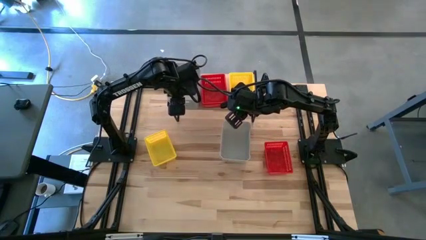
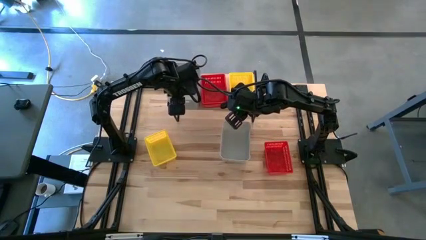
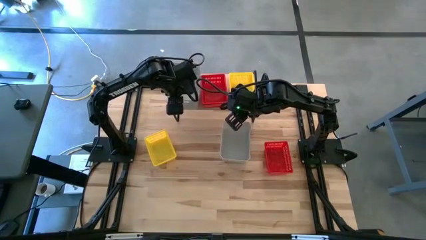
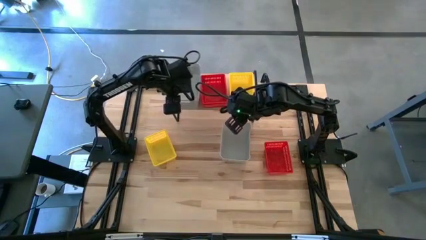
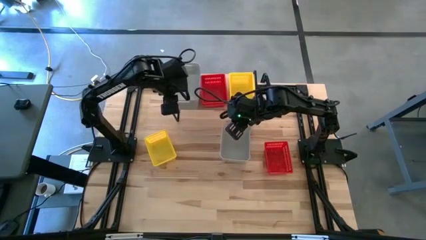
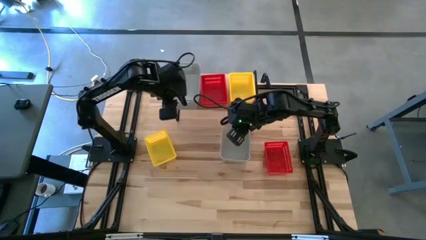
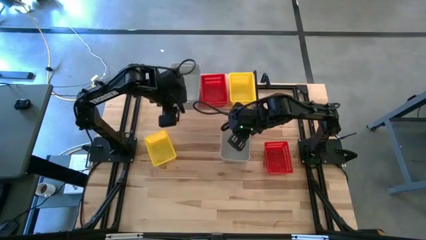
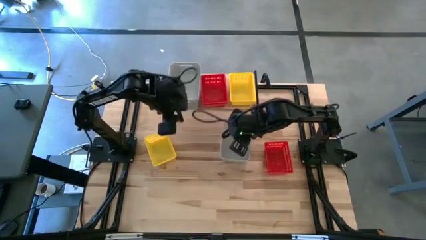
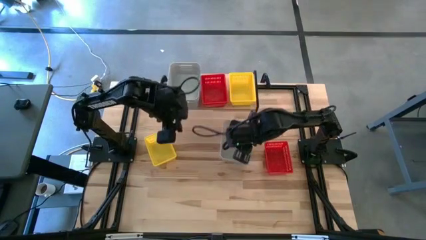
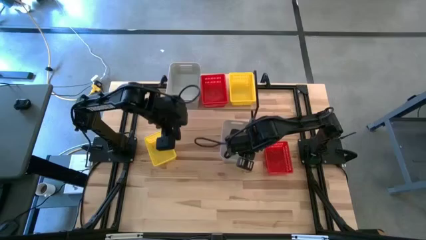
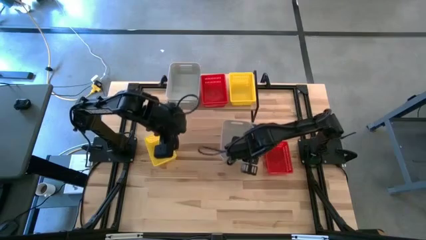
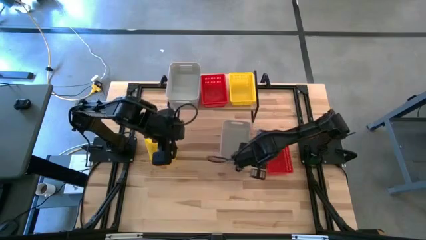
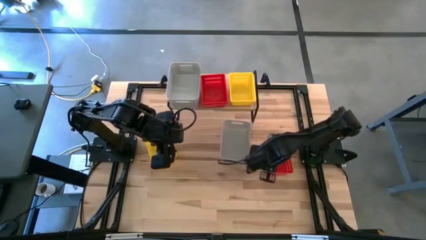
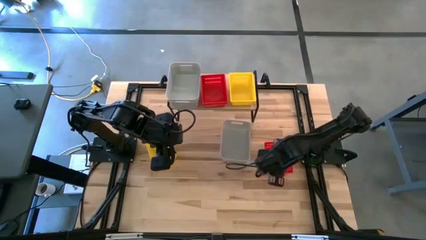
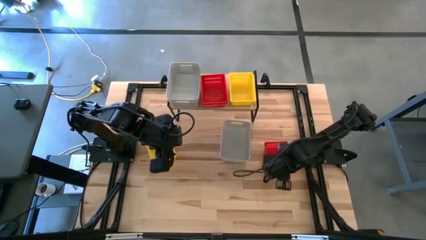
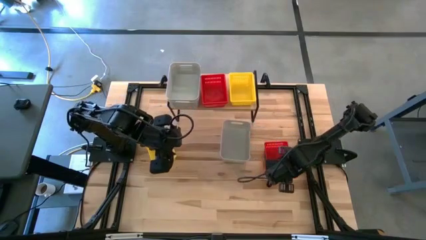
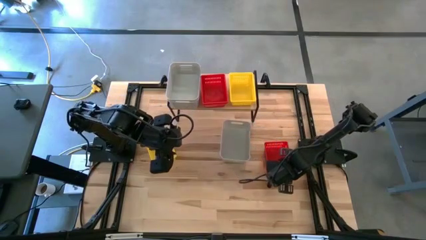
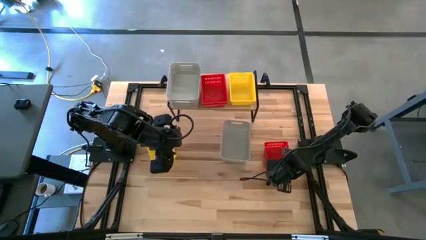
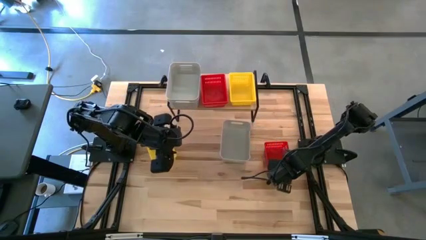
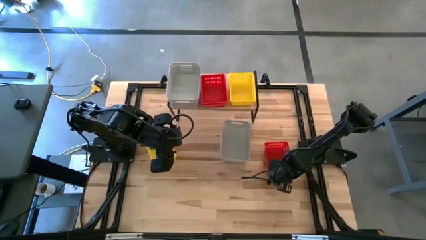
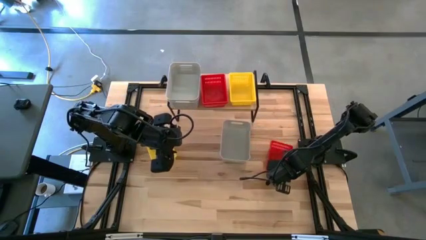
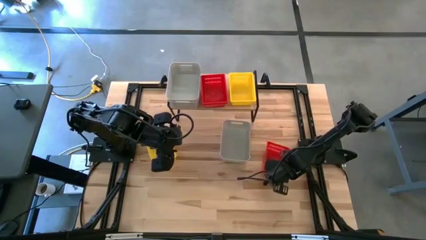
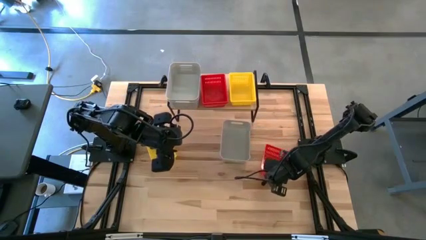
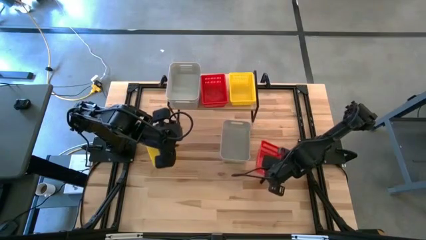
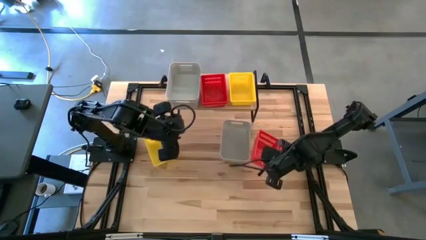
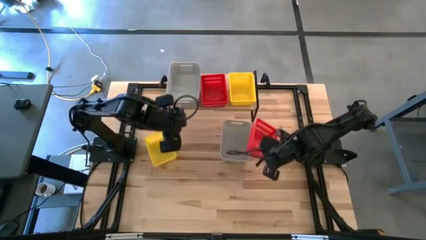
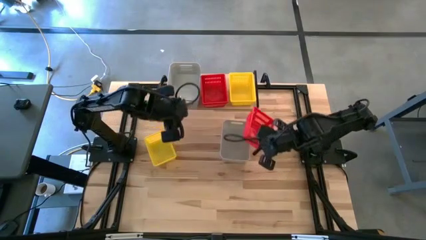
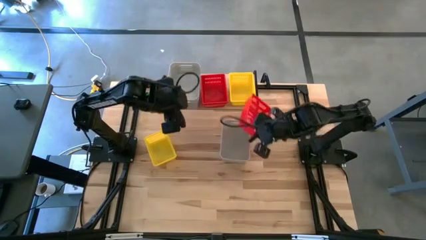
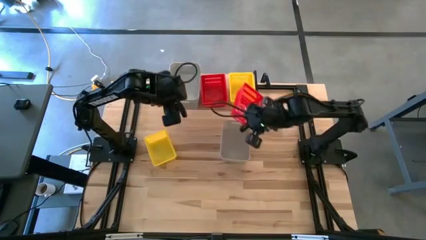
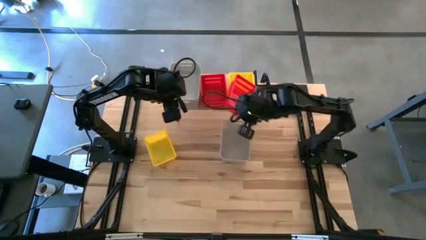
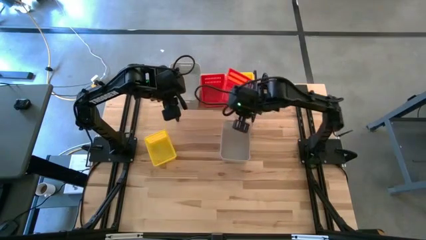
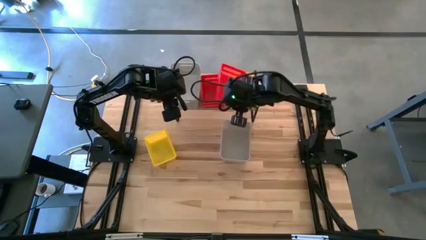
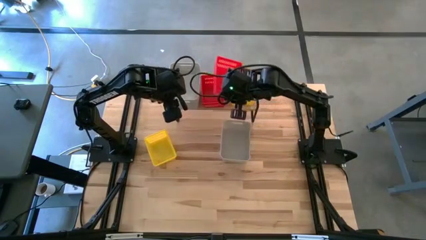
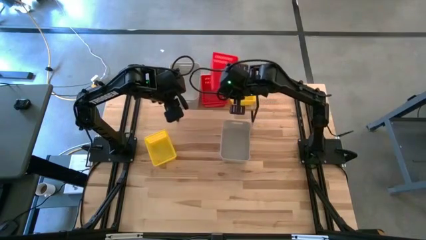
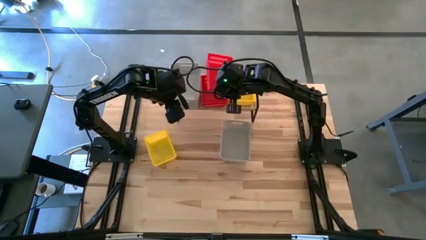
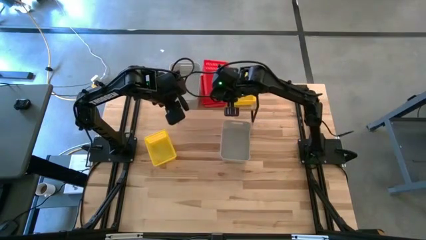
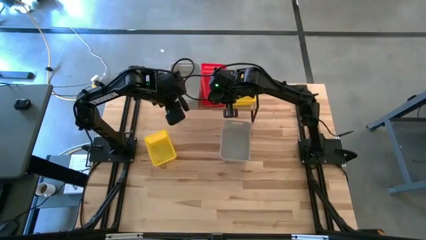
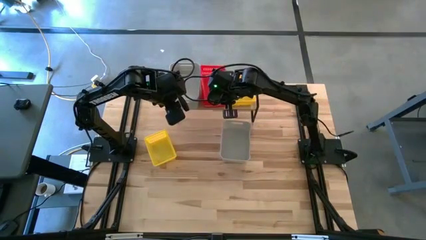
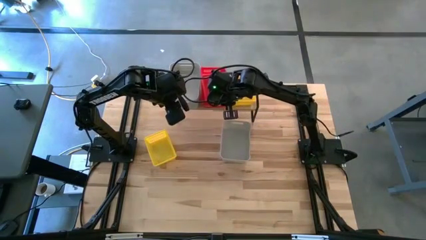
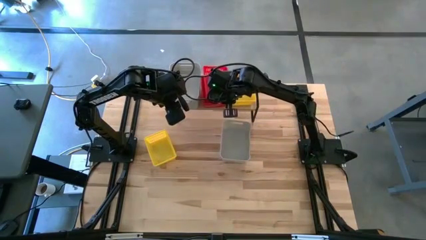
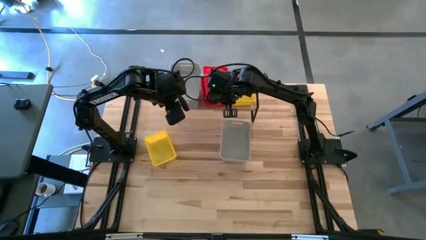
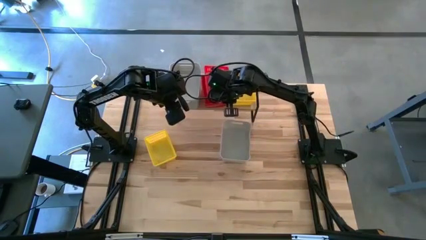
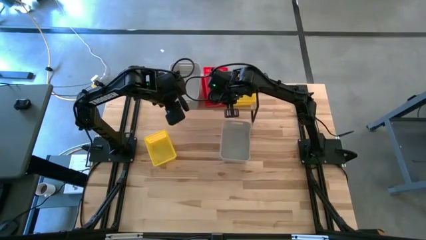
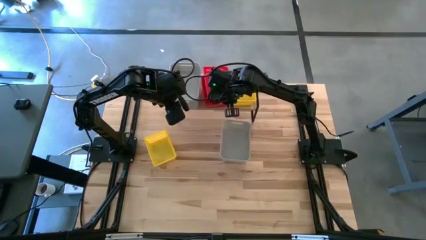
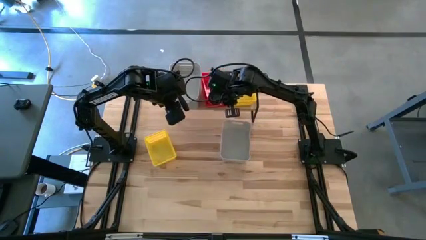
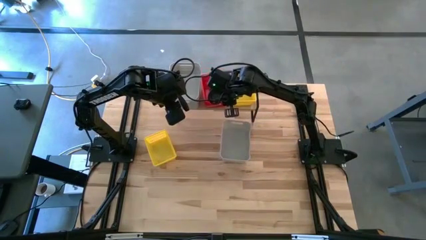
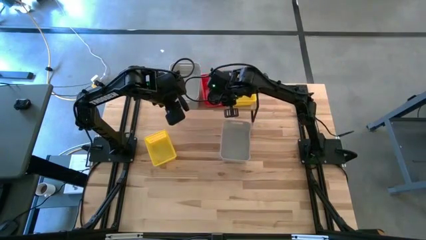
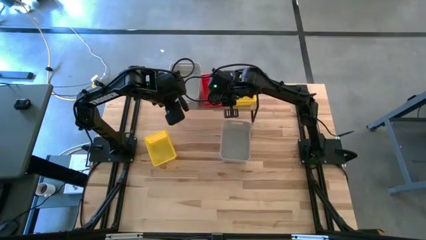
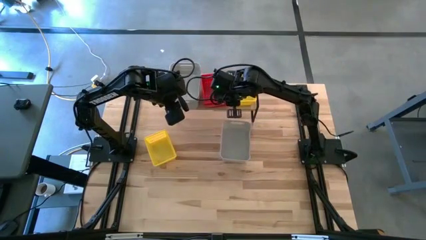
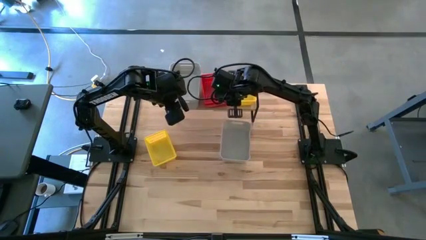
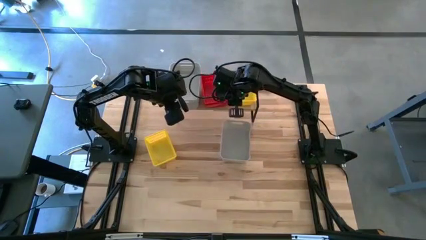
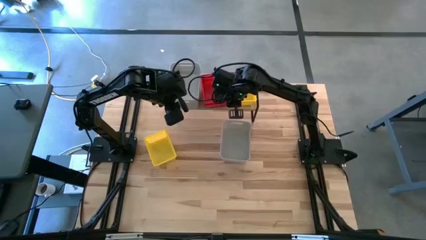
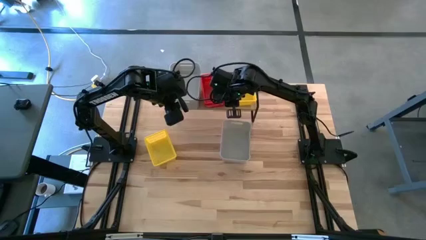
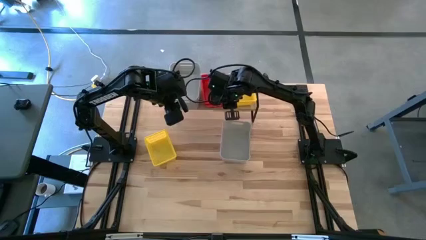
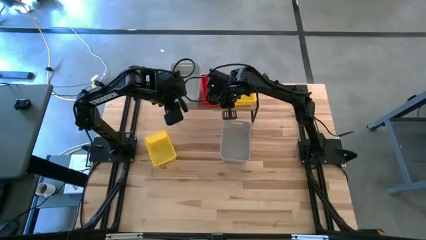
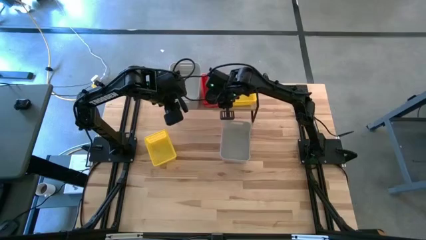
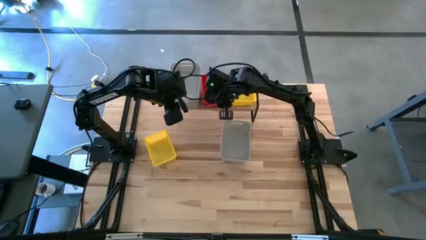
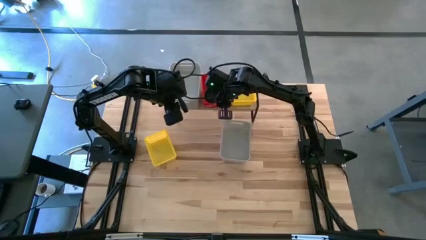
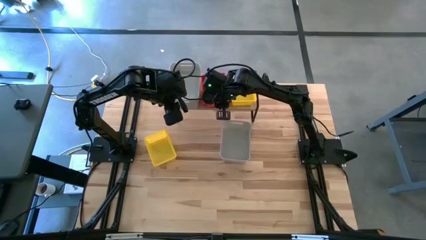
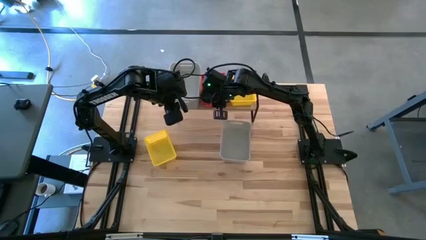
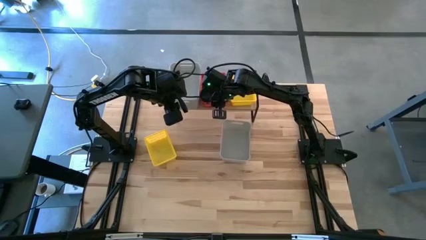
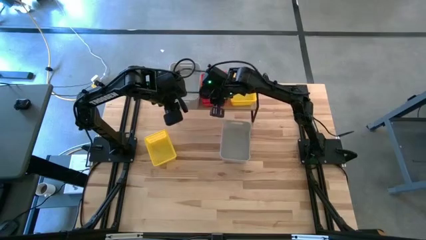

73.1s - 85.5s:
Task: Stack baskets on shelf by color
Stack the red bin on top of the red bins on the shelf

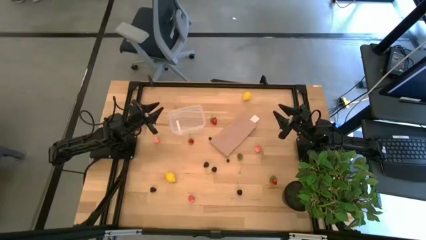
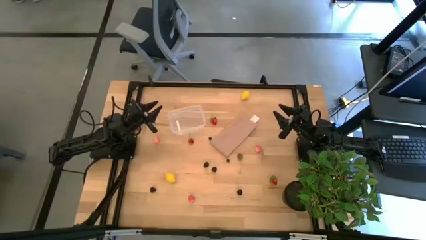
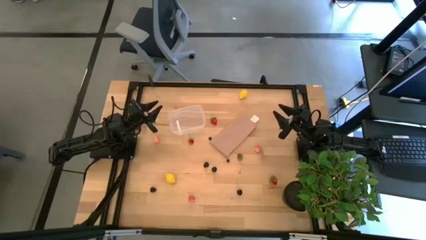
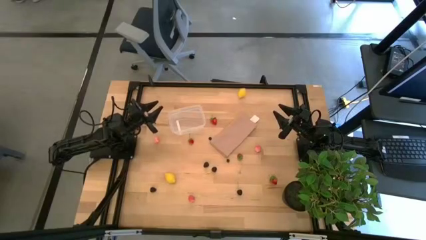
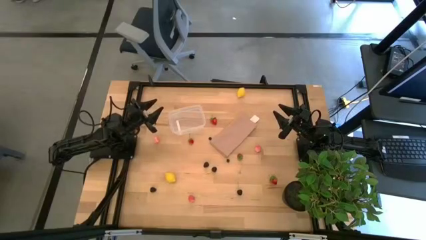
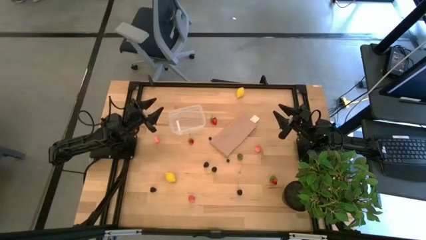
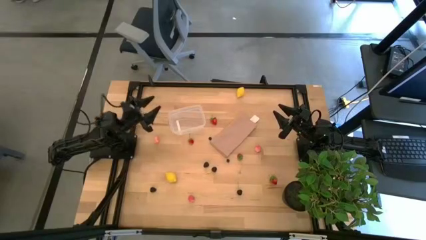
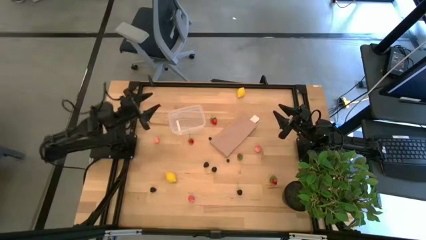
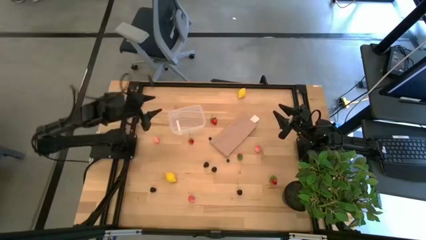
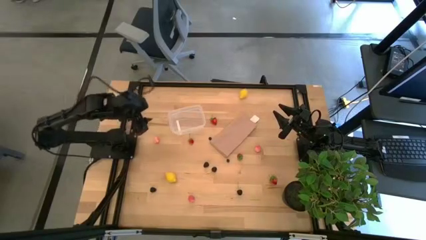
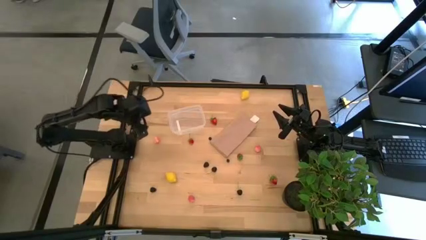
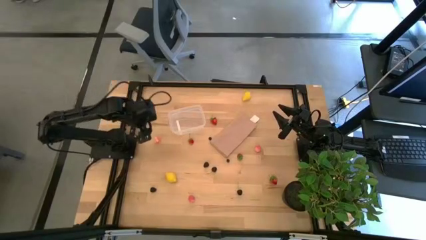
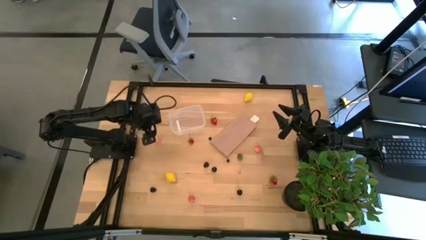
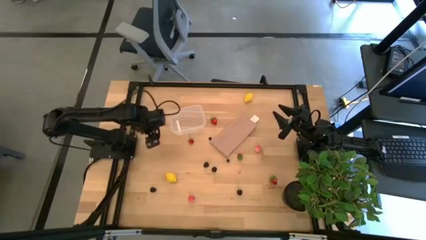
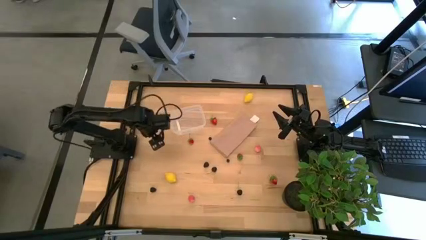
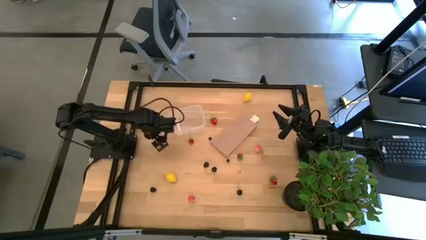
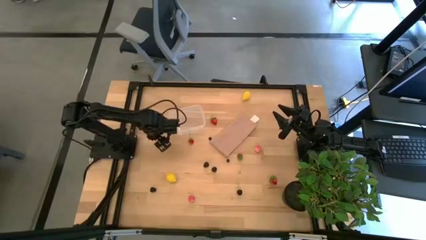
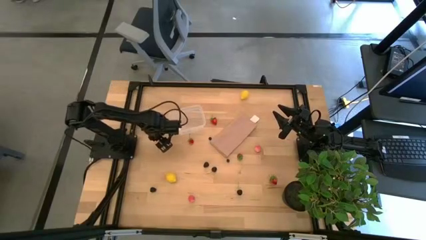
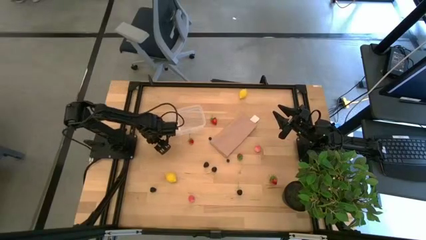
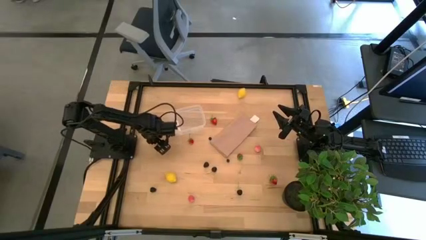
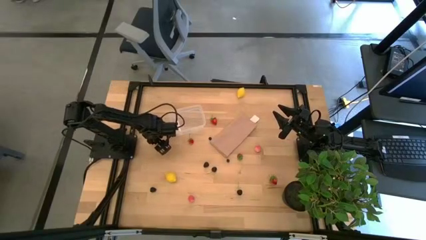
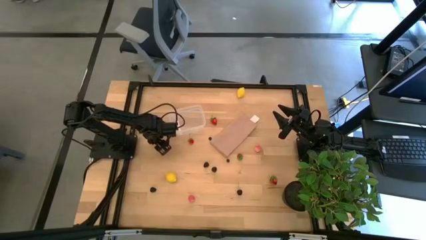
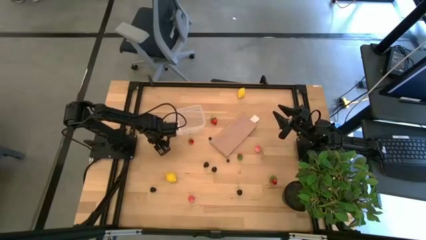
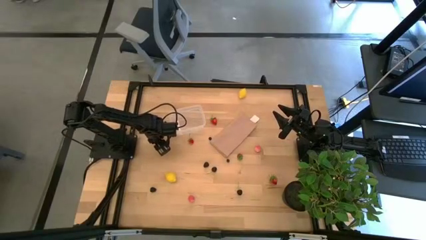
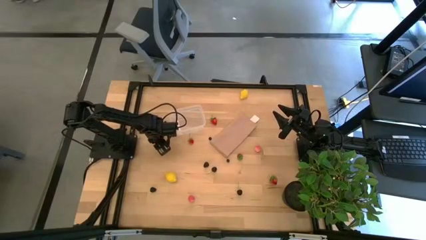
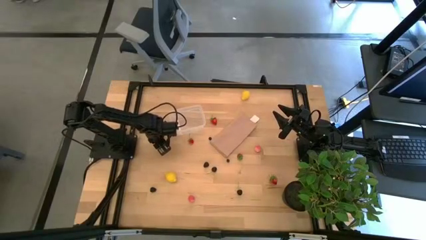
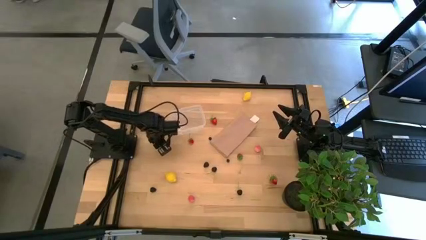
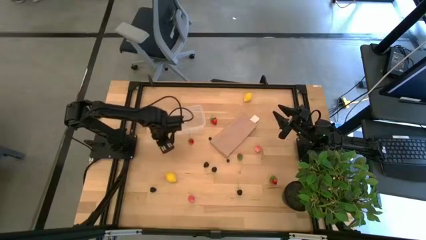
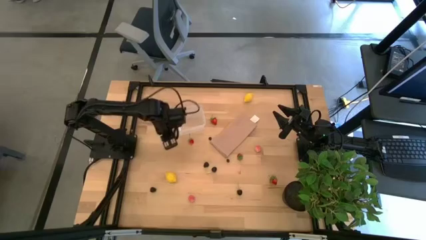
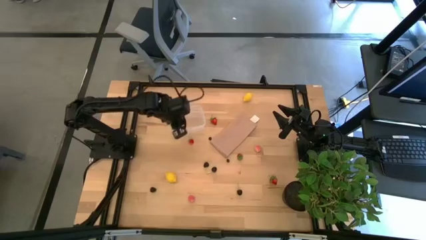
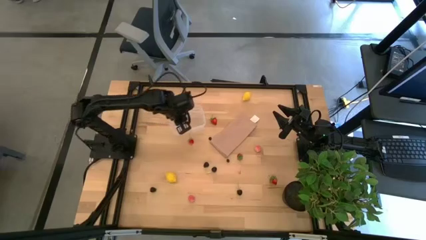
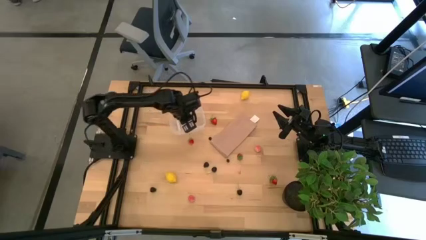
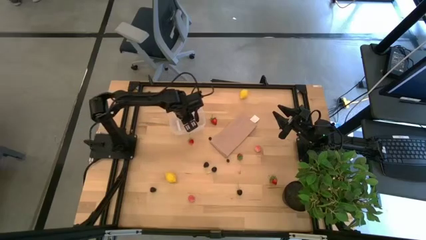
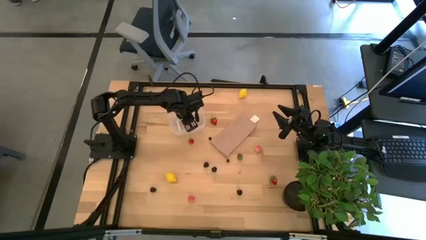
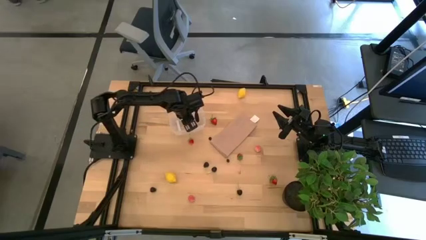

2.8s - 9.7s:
Task: Pick and placing Produce into tupperware
Put the peach into the transparent bin
